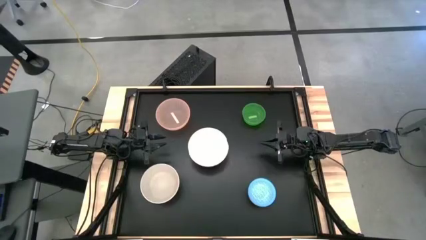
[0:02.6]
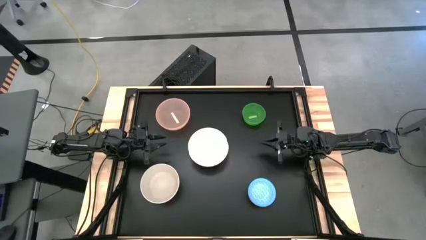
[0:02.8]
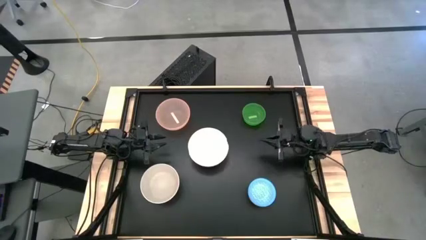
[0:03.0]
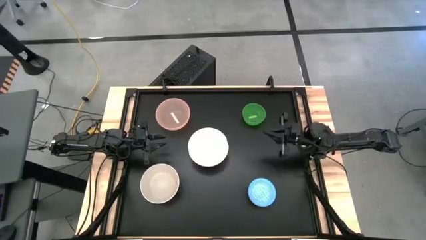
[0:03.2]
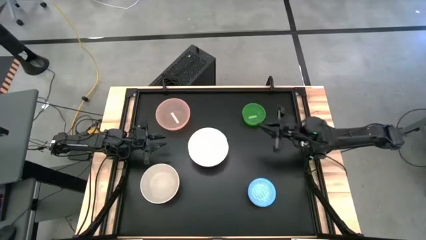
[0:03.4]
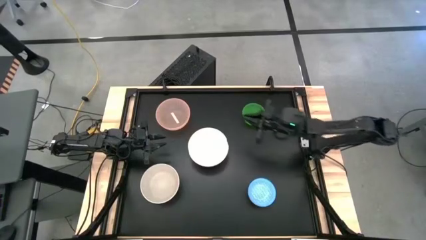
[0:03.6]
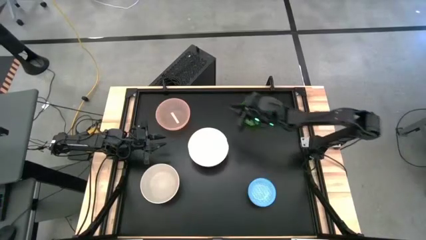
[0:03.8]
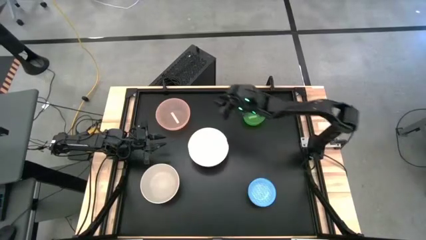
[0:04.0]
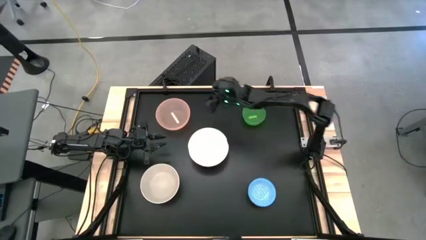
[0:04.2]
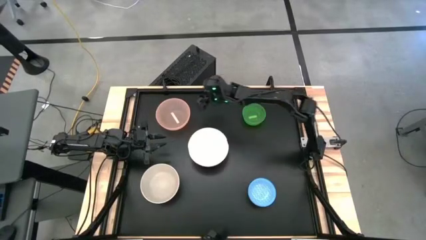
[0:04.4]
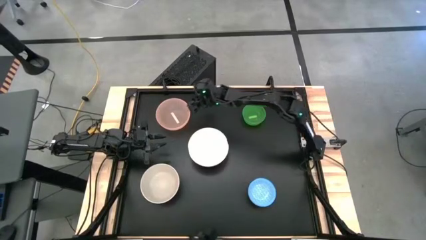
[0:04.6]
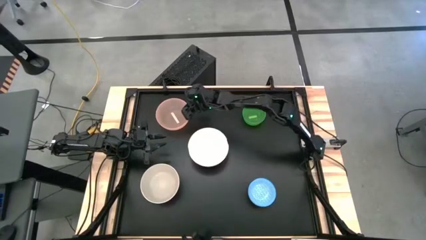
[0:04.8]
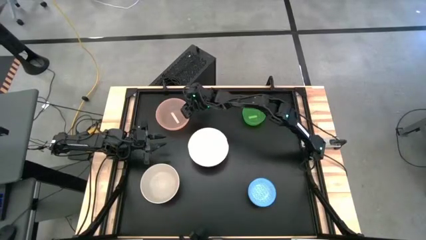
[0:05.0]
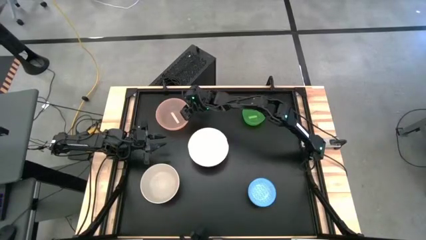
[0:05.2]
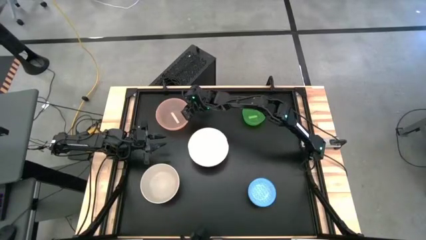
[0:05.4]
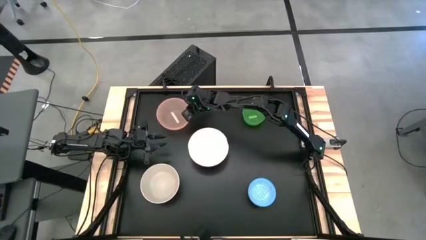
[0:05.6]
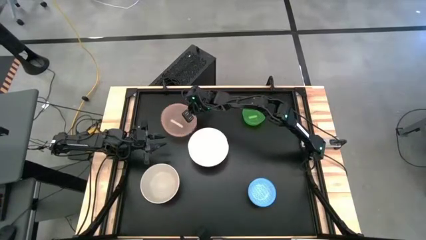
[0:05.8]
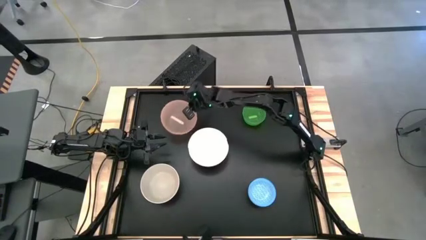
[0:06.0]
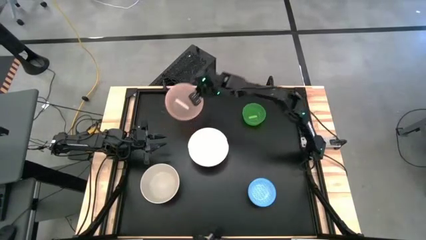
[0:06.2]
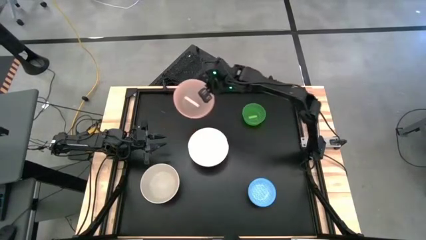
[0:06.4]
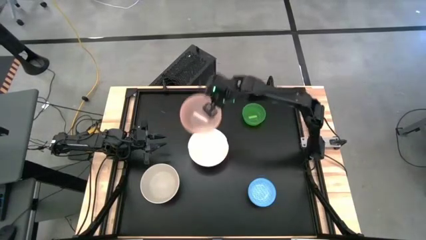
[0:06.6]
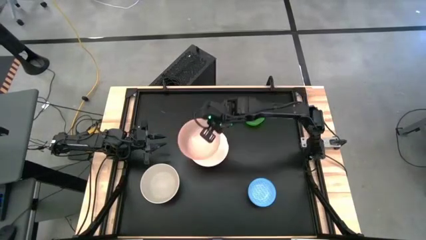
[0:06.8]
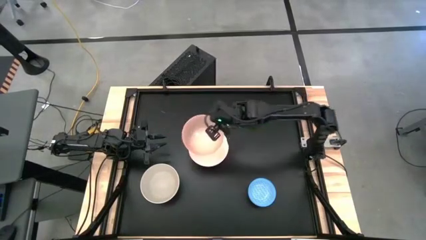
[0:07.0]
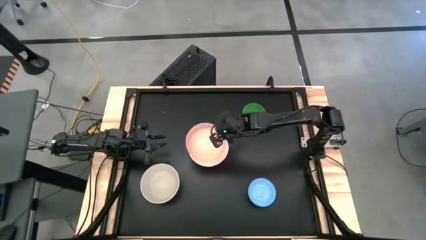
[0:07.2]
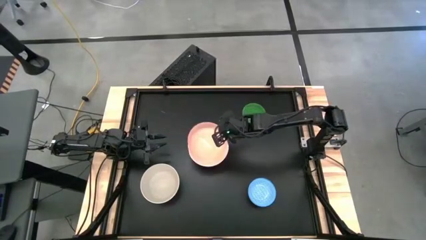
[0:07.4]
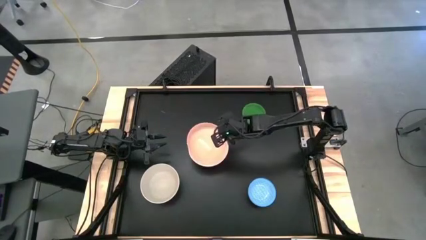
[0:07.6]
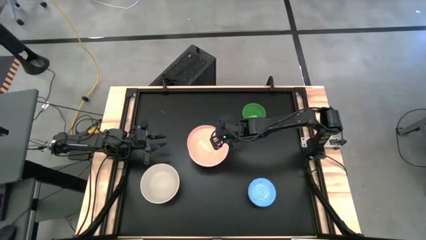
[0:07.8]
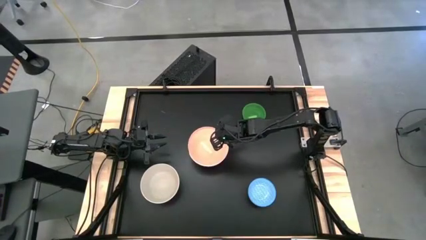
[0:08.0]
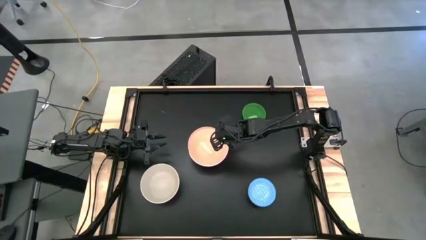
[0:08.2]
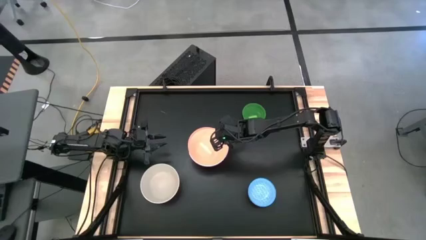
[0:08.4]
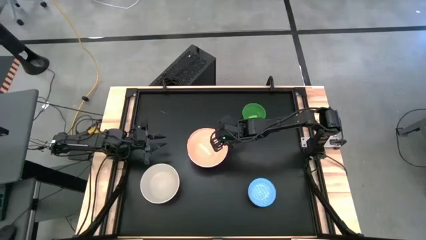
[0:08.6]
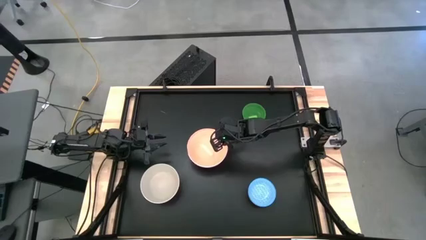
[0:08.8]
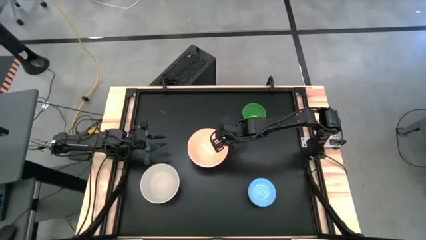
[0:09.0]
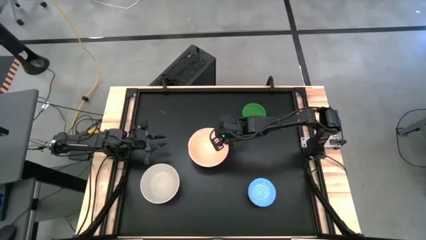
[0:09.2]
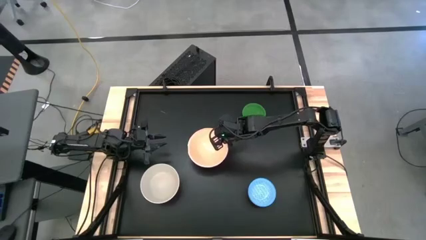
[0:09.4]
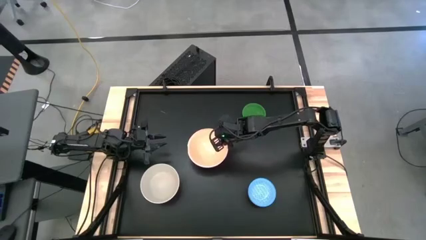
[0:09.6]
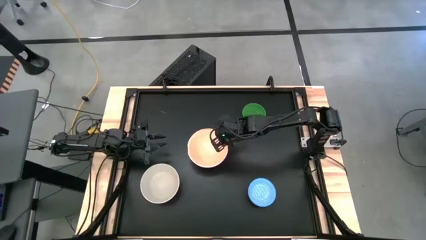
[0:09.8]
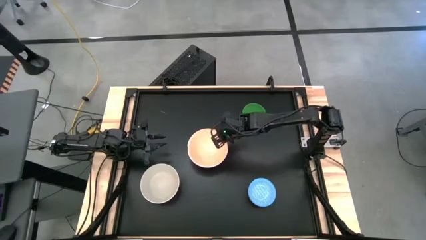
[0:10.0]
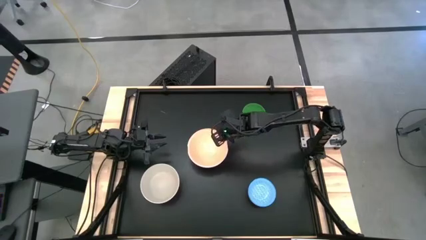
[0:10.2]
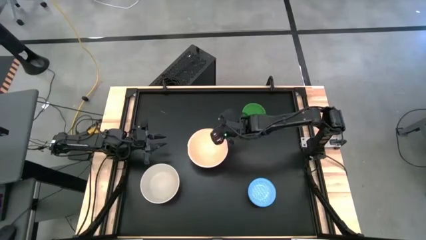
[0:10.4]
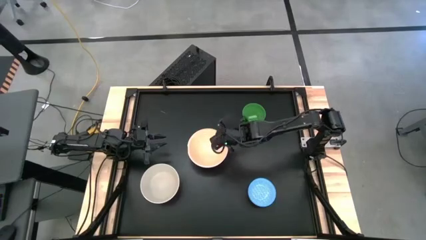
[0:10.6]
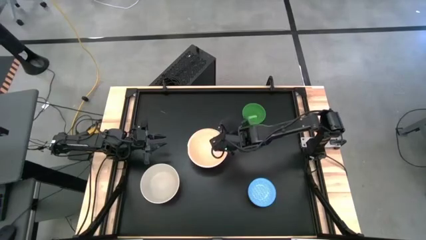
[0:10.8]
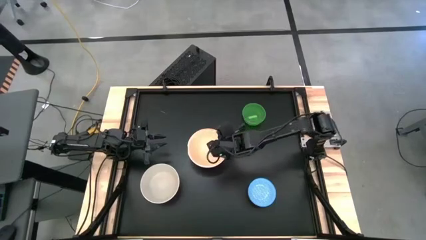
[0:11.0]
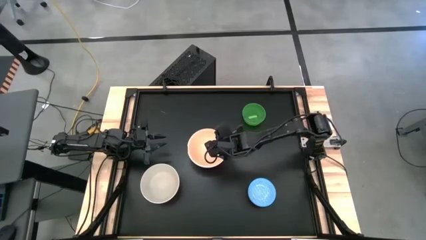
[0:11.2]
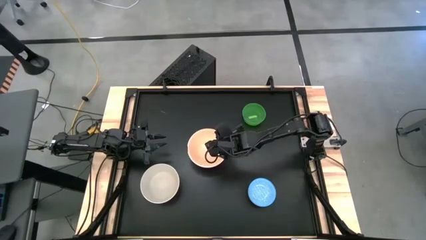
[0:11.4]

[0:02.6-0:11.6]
Stack the pink bowl on the white bowl

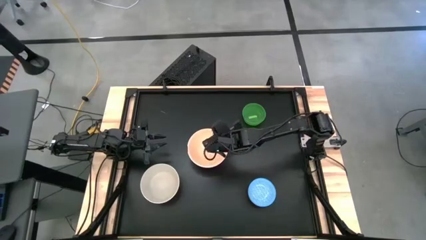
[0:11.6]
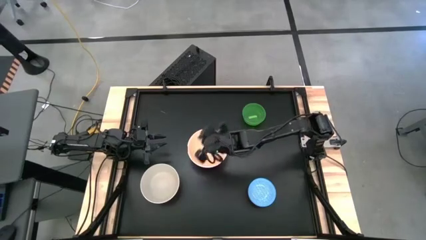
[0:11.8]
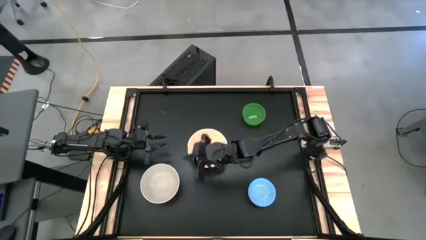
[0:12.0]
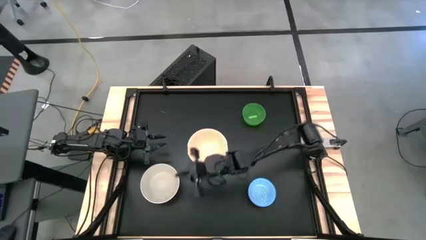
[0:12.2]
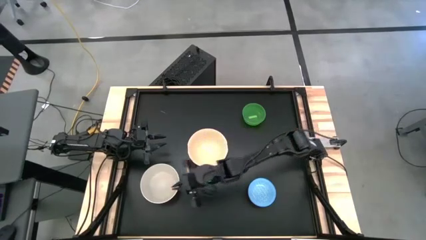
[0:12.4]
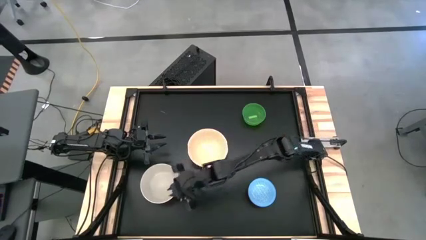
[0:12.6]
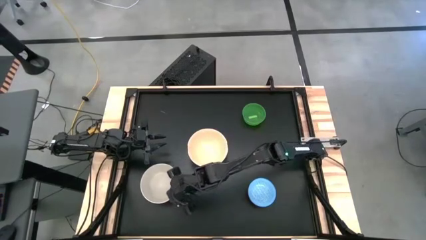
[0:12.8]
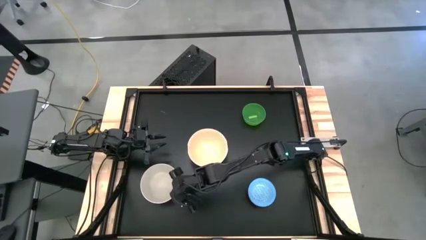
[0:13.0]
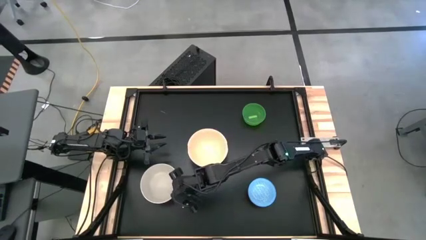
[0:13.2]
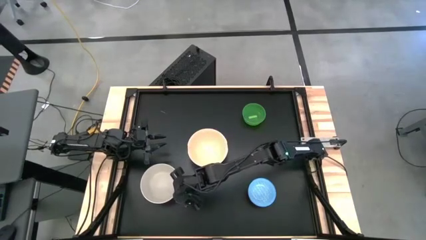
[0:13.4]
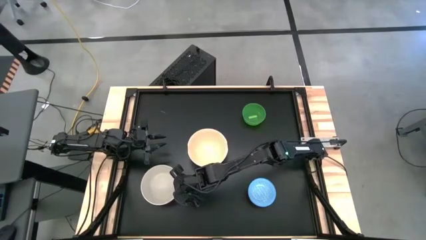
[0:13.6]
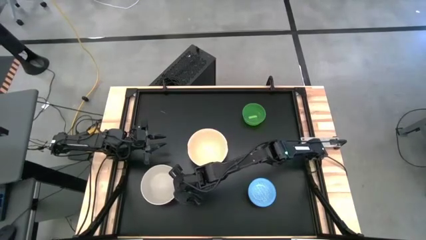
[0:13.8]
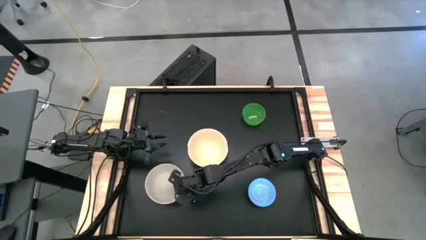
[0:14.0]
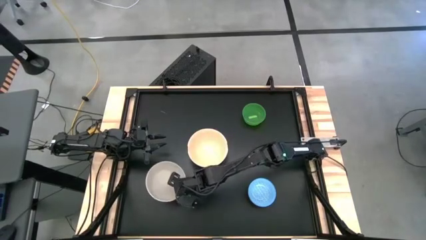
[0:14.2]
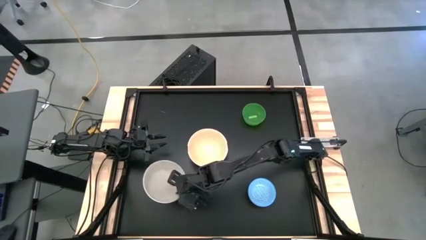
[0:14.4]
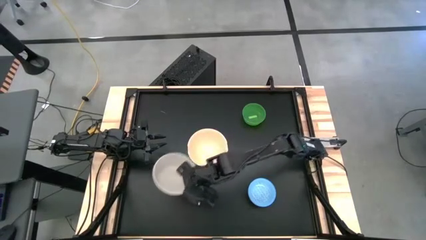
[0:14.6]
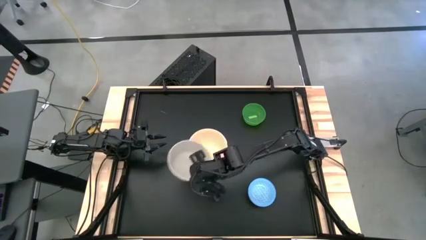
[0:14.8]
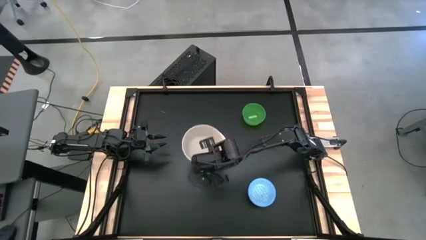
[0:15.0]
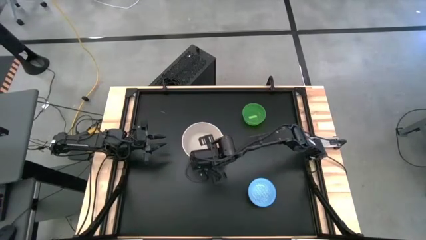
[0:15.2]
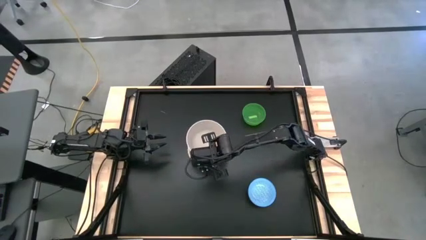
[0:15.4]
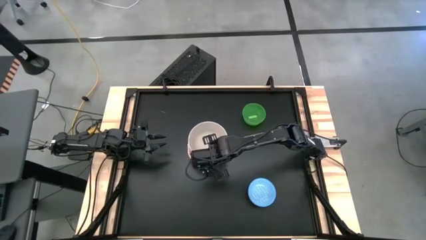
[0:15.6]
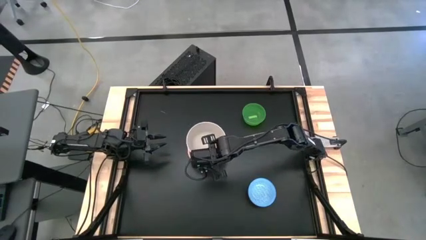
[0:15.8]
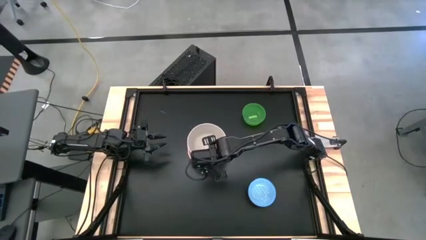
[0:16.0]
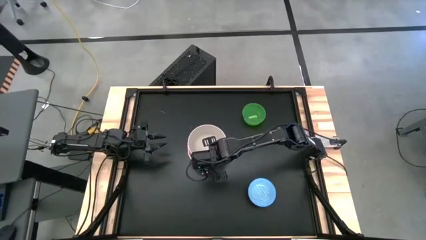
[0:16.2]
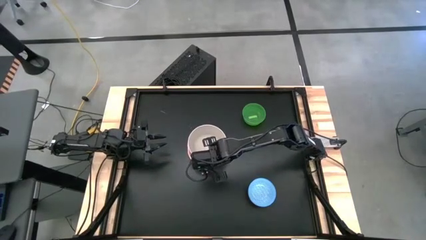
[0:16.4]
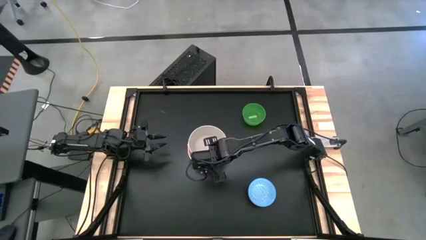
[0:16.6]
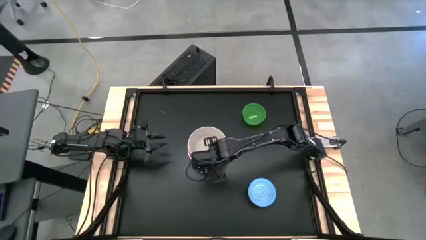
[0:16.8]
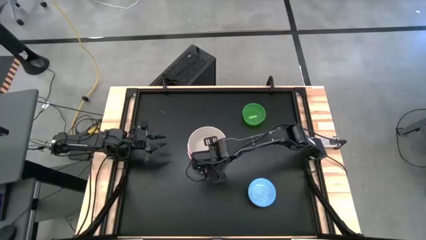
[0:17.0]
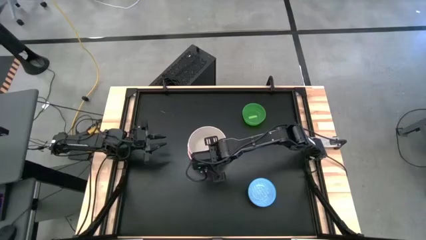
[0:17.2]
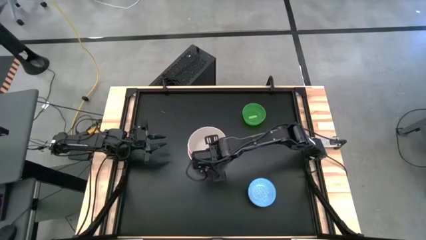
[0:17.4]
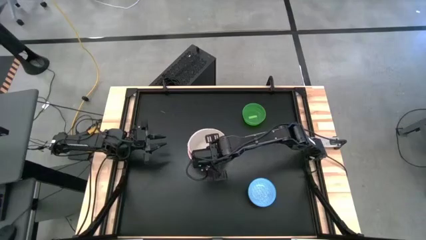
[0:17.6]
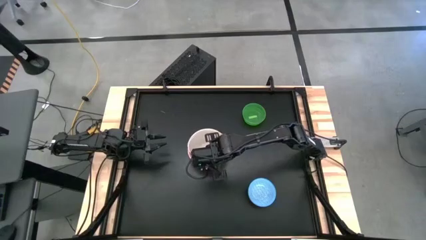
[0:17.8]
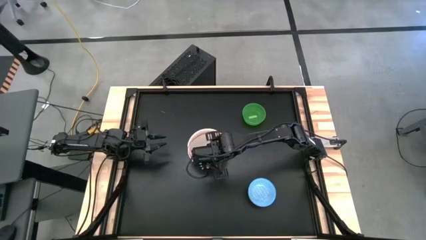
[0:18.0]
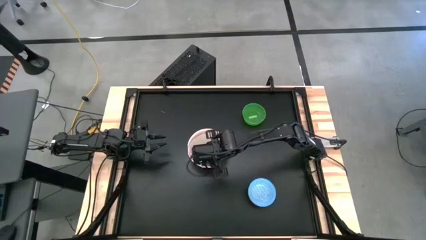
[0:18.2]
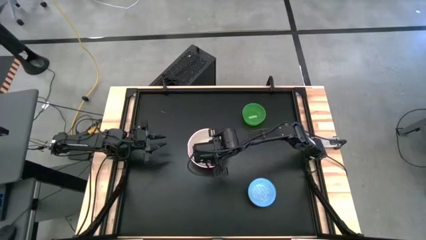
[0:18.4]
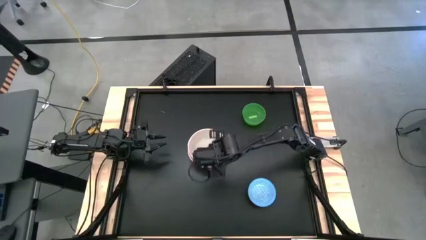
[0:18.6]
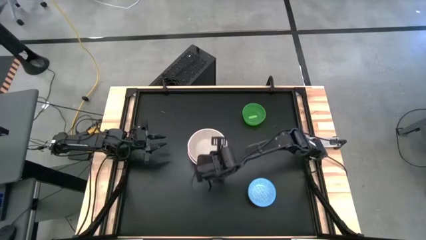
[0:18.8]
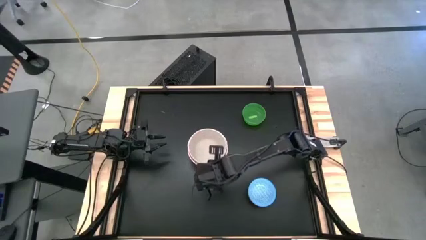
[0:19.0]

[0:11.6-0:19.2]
Stack the grey bowl on the pink bowl
